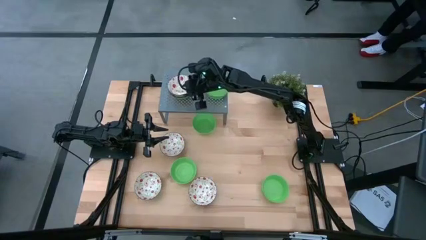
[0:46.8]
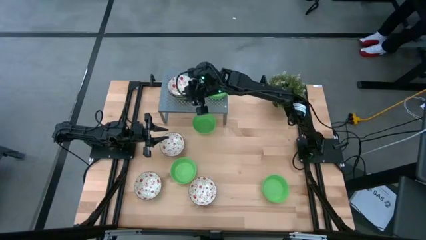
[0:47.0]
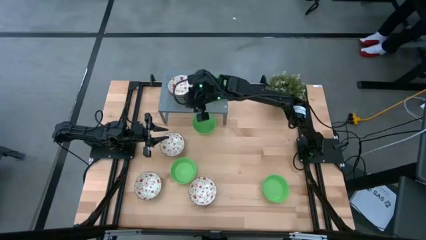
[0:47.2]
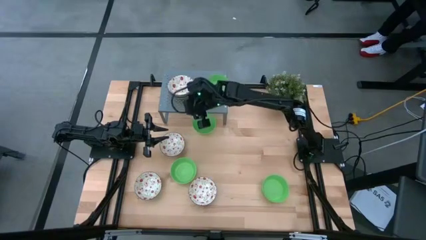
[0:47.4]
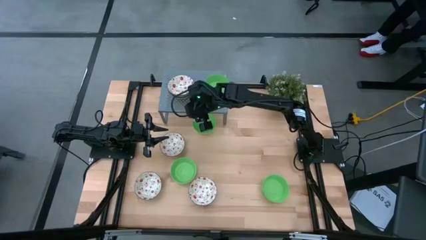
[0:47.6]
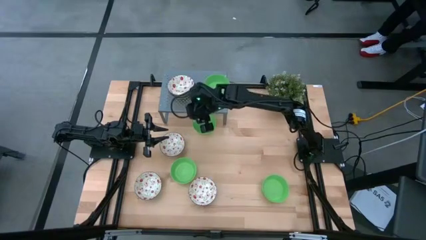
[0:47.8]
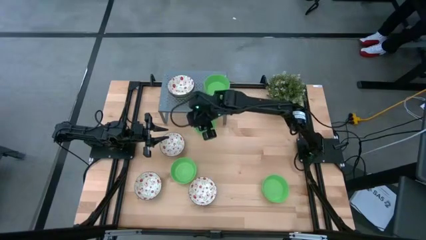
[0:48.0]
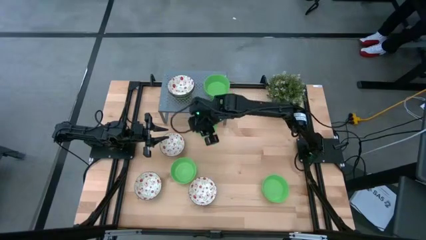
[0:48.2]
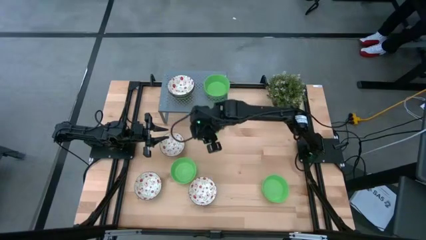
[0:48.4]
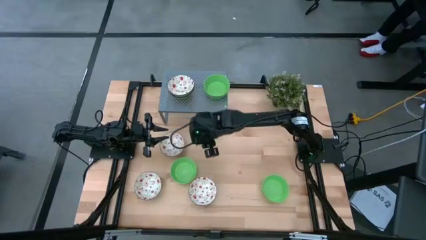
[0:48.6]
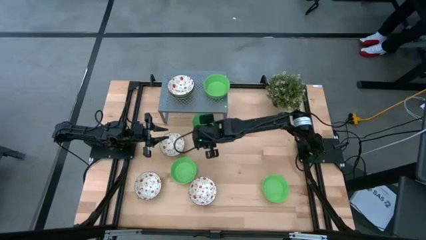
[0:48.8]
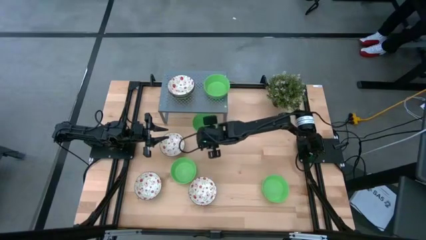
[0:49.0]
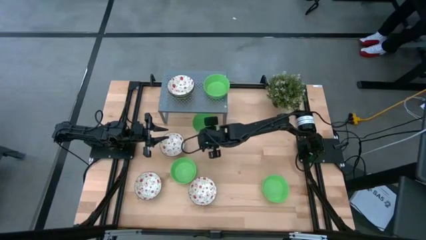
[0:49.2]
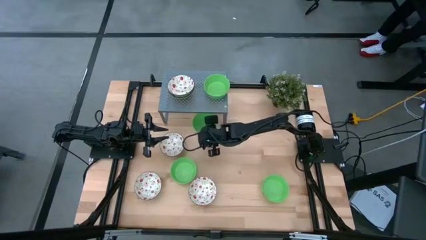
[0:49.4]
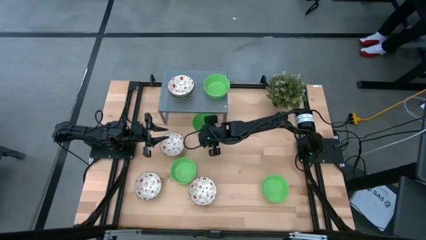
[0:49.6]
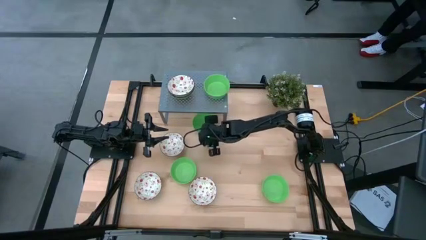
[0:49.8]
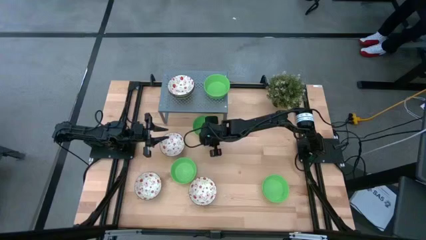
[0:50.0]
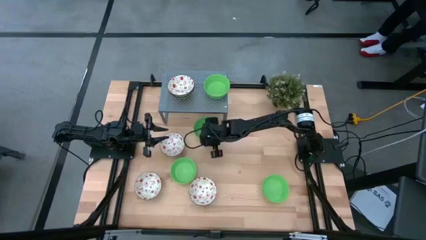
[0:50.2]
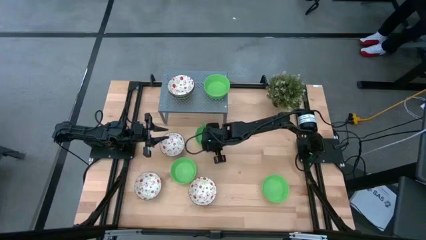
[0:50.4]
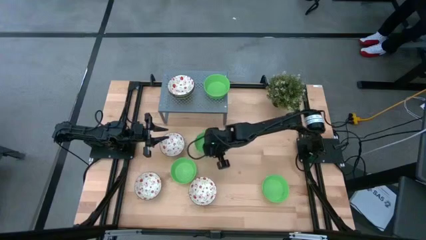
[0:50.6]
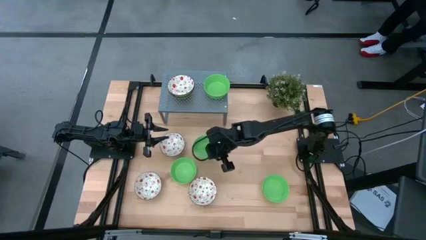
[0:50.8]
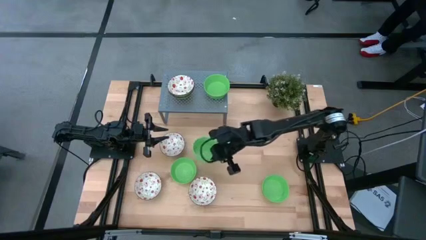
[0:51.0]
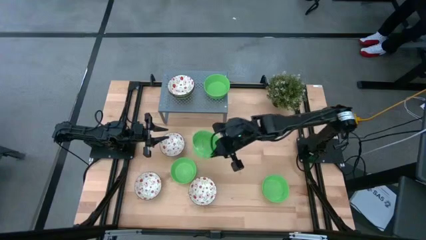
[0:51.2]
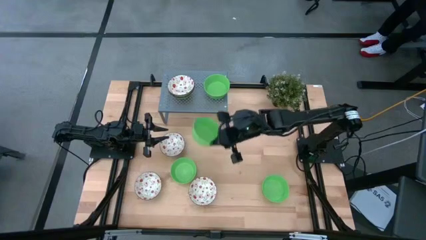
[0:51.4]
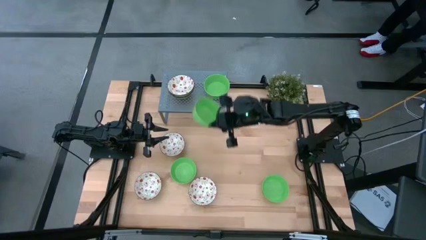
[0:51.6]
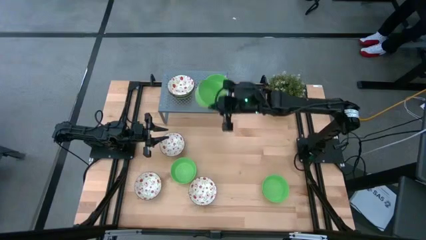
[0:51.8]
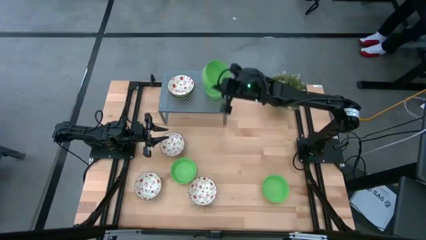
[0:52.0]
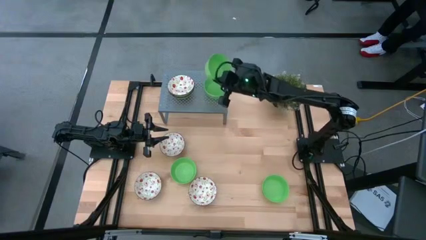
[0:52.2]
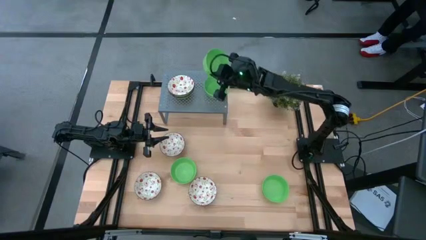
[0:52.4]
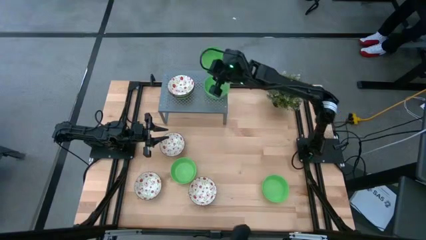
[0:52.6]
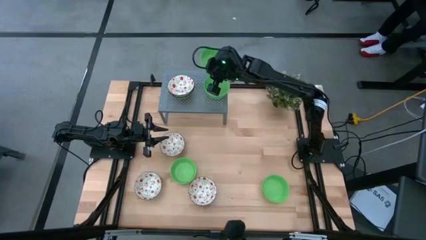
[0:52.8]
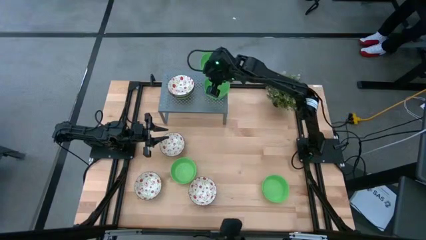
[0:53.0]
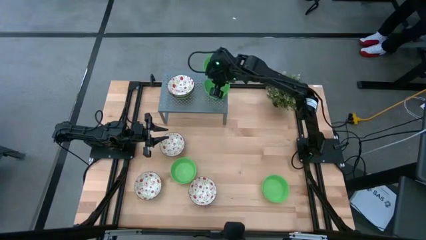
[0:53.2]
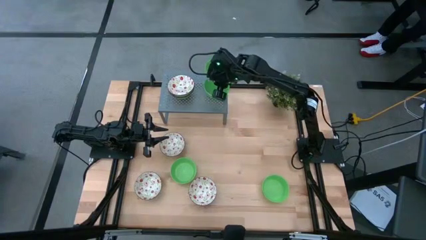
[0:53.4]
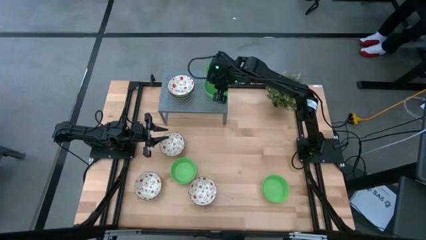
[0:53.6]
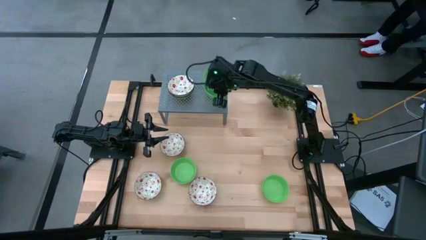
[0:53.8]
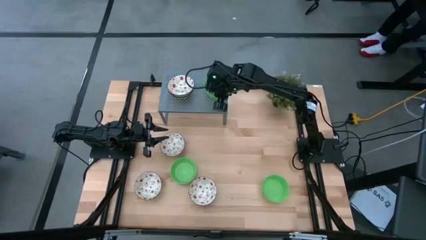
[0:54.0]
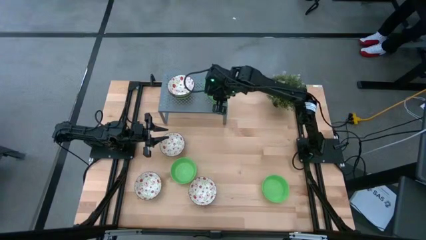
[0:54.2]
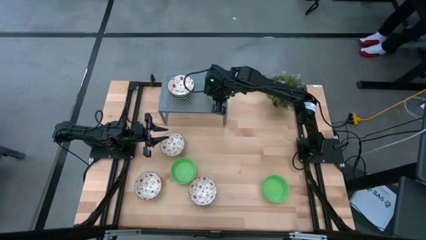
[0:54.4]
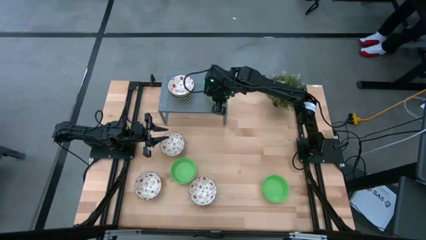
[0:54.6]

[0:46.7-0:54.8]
Task: Pick & Place Mini bowls
Stack the green bowl on the green bowl on the shelf

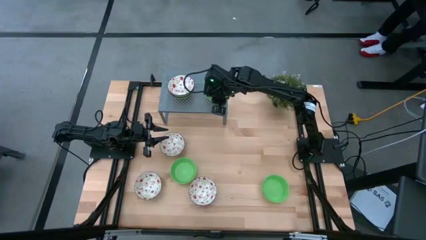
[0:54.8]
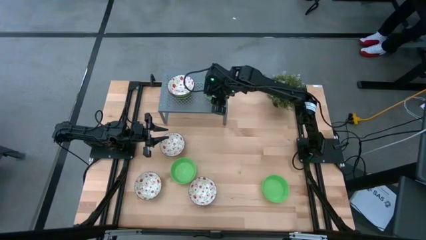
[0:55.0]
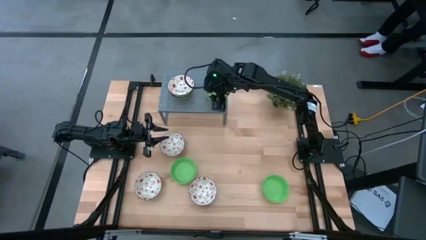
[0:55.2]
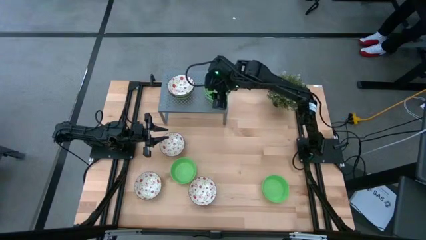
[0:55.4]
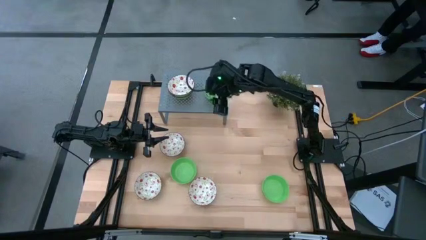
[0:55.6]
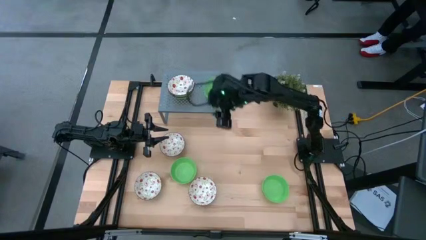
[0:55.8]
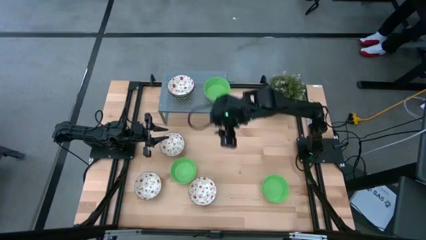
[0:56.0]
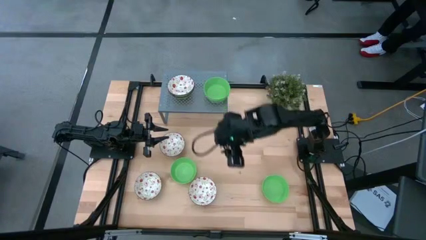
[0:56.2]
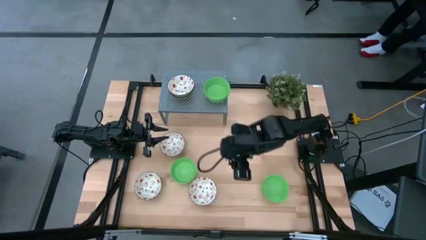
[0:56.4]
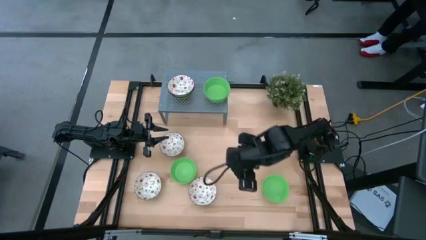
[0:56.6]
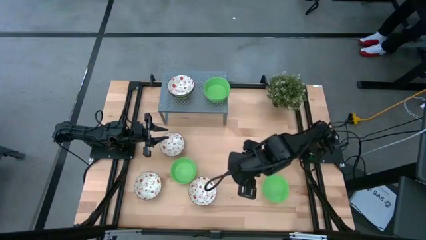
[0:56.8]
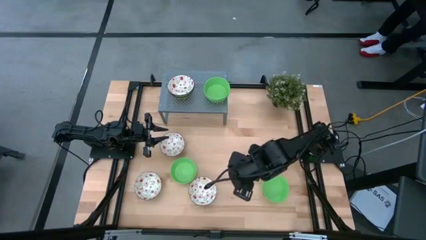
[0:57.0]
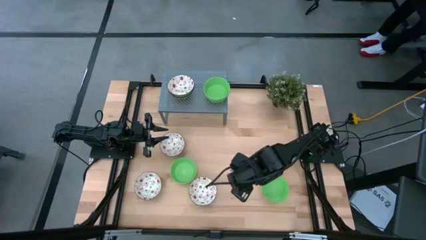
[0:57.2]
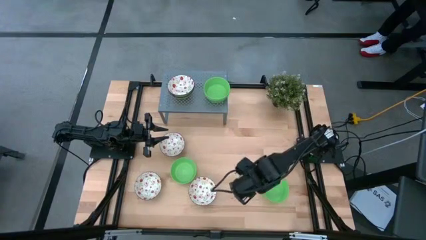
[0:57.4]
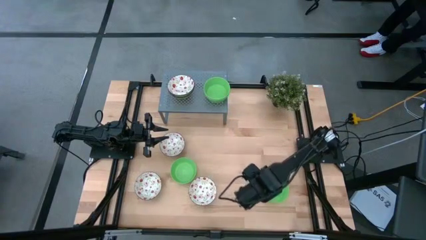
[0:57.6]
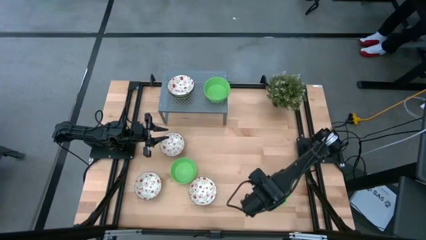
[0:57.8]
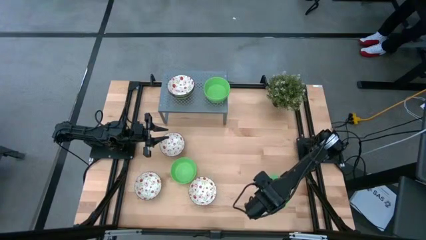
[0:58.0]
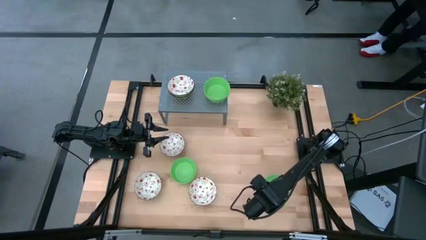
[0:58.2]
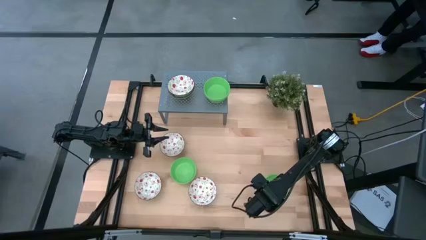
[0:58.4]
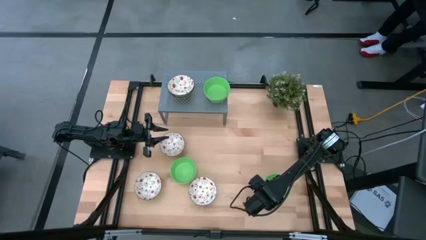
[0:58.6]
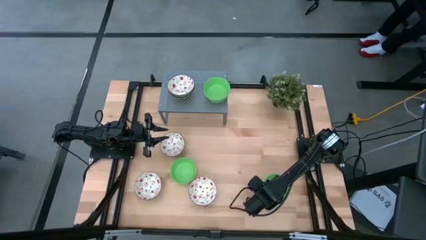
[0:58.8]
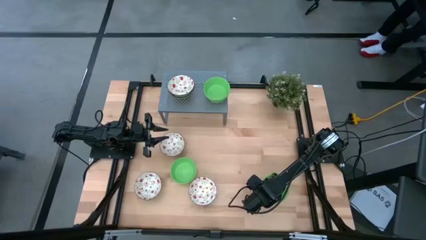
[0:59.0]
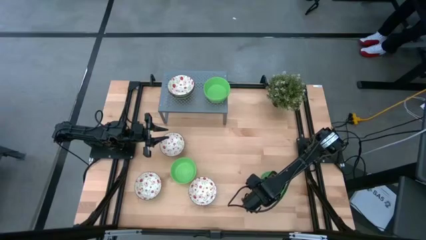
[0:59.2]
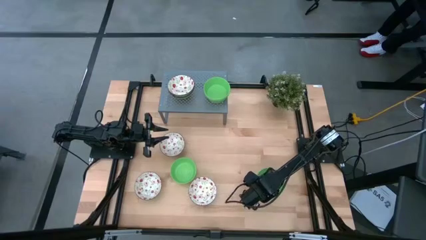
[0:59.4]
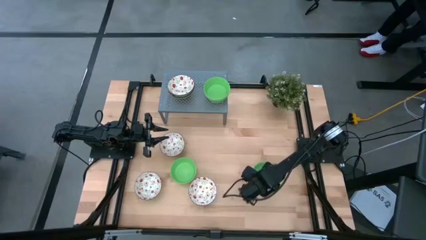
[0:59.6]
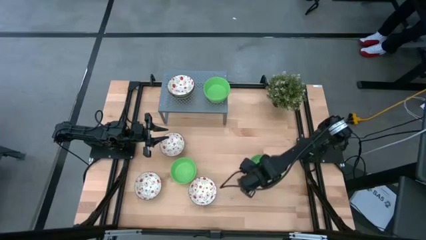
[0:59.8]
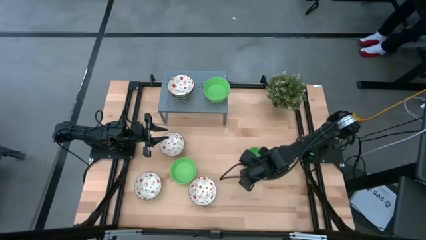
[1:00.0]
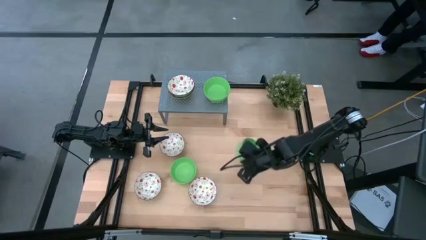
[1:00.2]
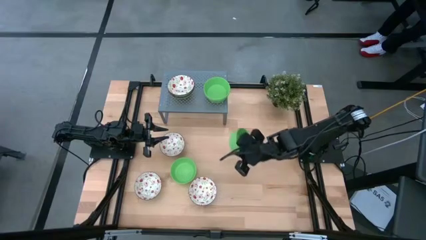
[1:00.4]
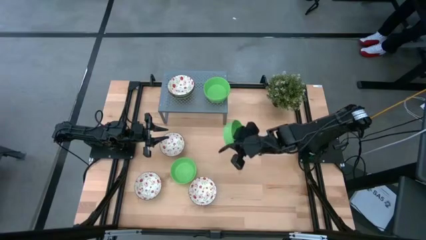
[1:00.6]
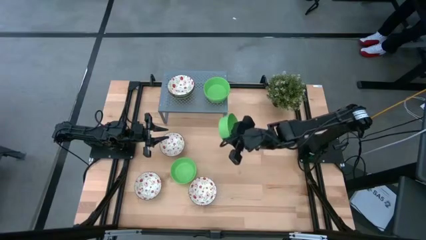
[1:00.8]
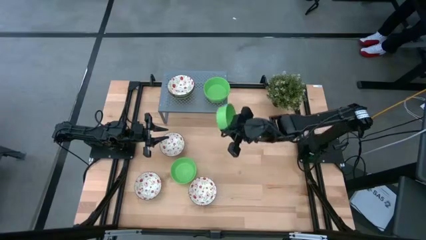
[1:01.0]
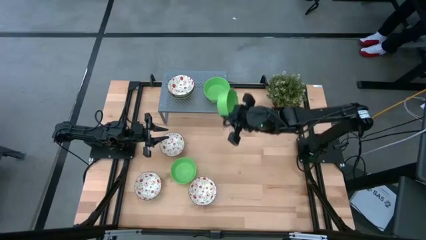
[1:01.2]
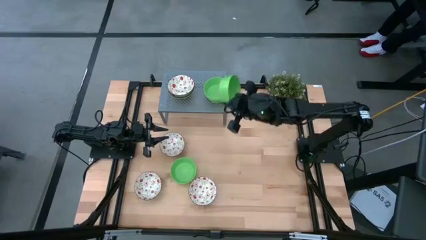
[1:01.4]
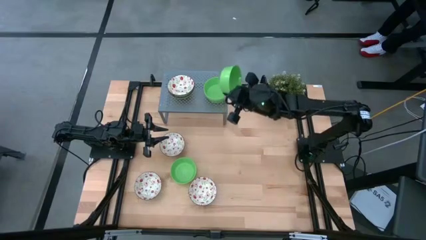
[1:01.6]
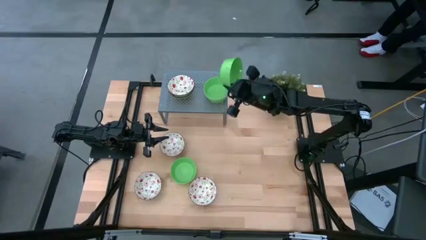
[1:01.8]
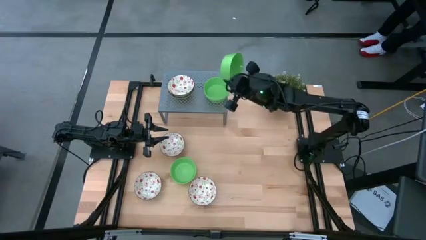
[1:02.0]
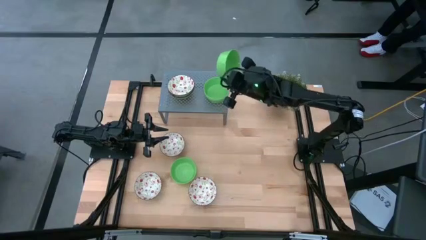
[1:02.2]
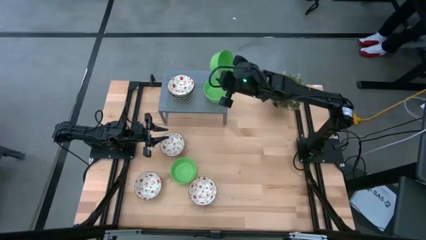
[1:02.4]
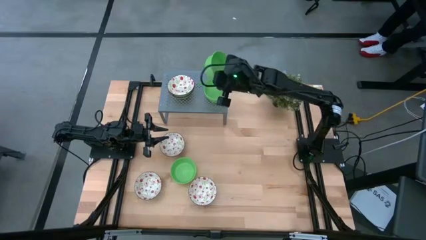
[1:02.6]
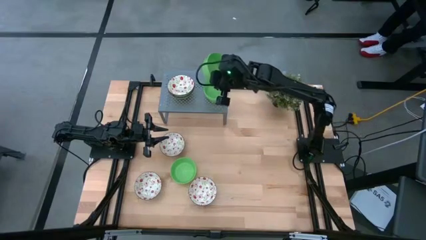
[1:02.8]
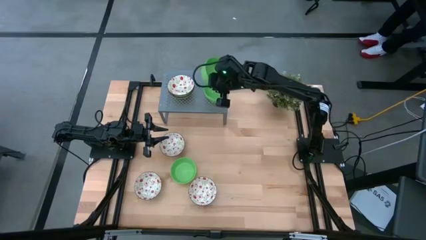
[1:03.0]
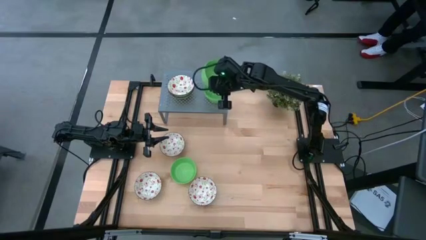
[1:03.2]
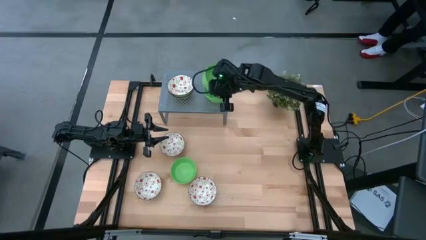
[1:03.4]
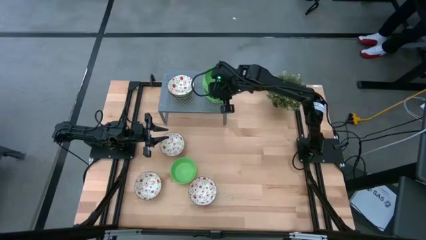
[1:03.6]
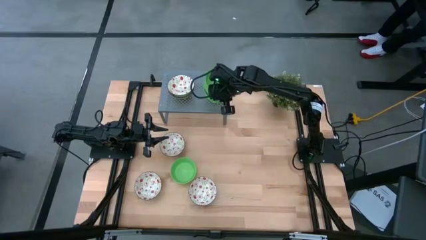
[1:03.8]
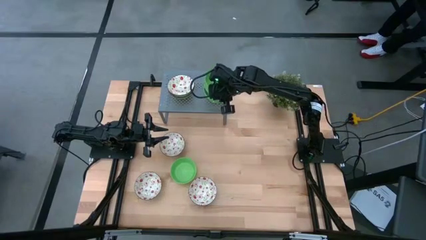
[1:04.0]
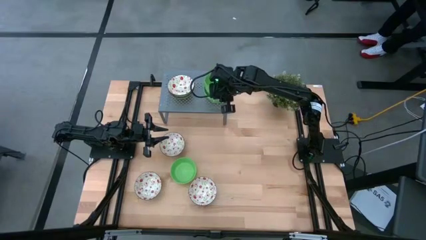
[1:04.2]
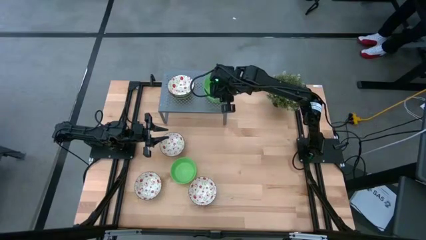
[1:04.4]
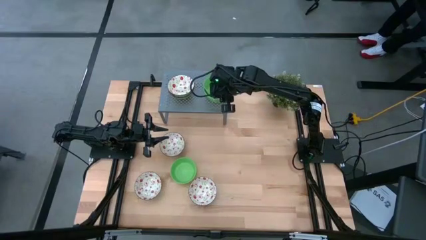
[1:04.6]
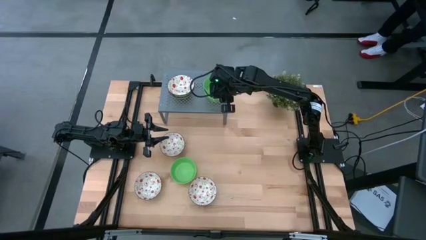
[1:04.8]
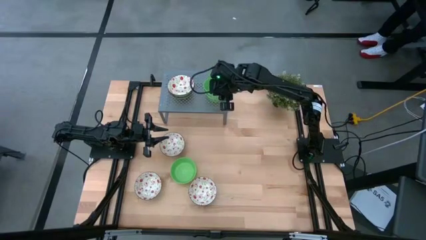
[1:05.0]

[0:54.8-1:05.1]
Stack the green bowl on the green bowl on the shelf
